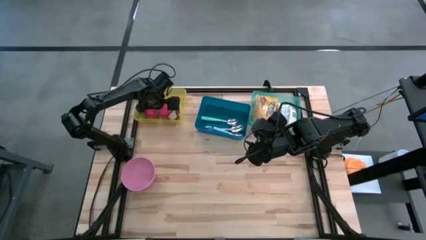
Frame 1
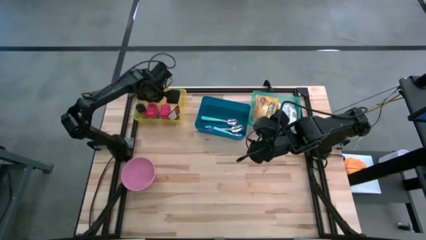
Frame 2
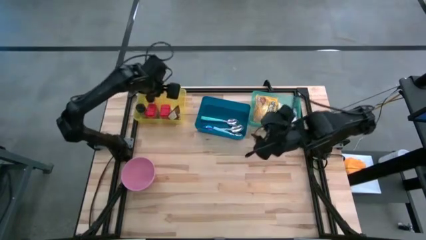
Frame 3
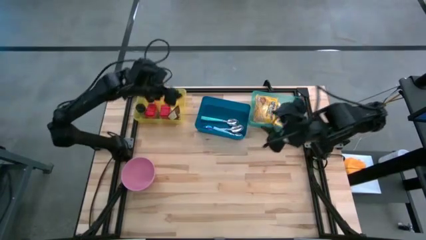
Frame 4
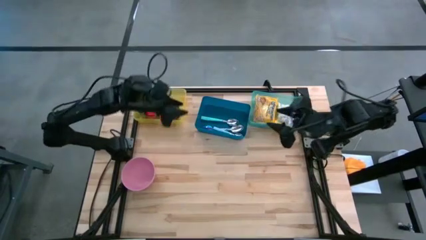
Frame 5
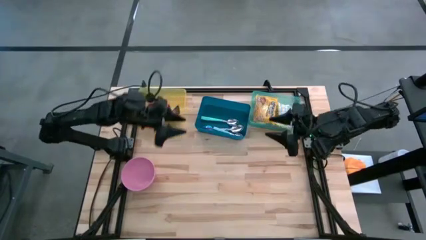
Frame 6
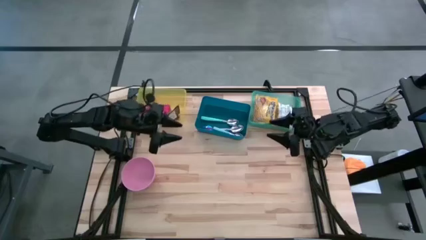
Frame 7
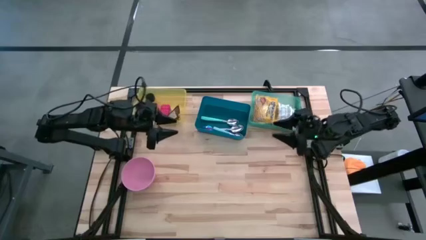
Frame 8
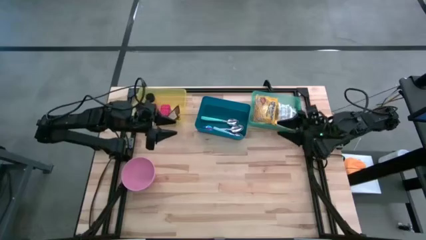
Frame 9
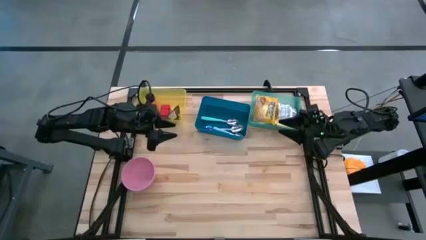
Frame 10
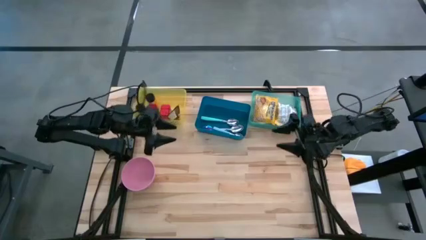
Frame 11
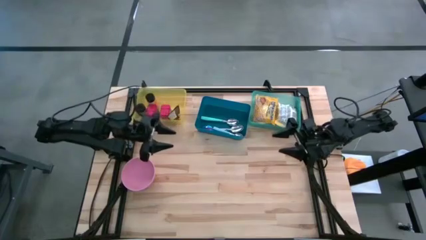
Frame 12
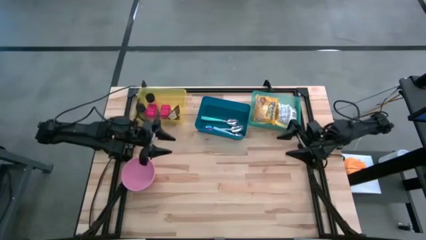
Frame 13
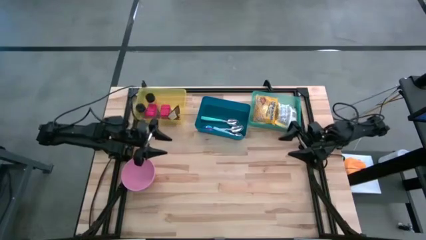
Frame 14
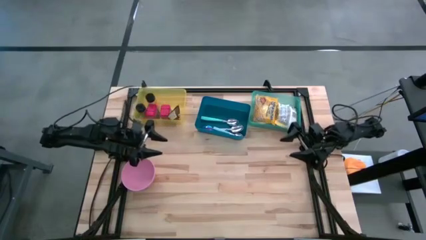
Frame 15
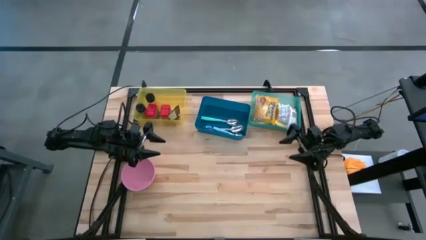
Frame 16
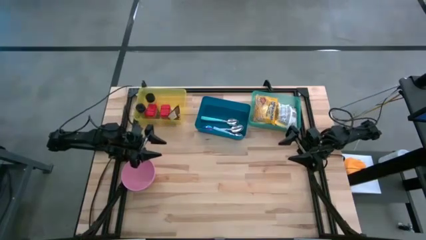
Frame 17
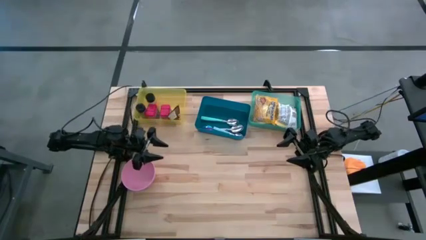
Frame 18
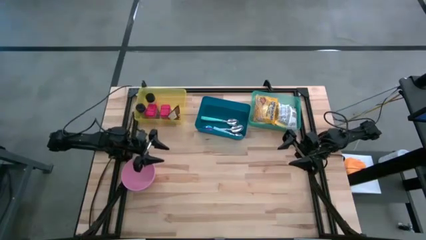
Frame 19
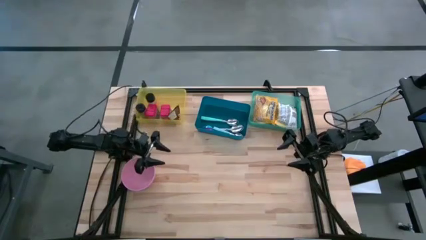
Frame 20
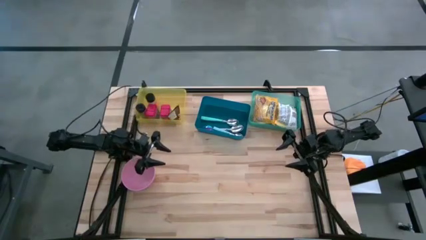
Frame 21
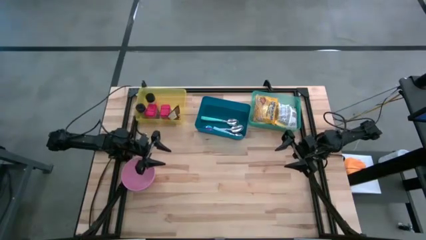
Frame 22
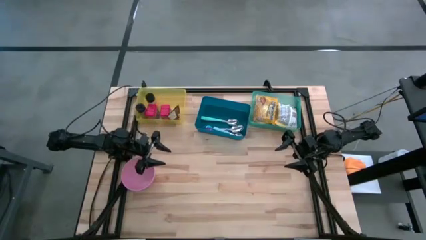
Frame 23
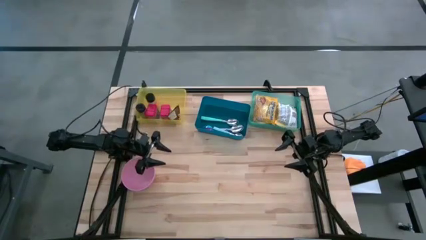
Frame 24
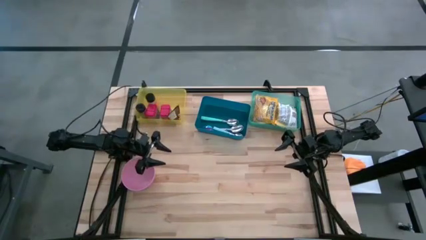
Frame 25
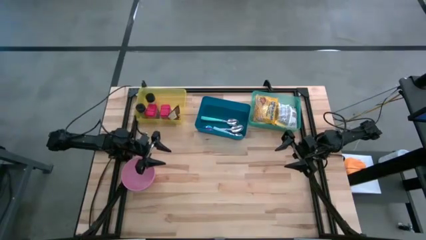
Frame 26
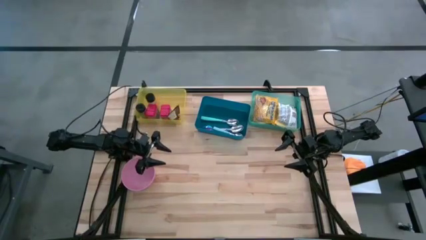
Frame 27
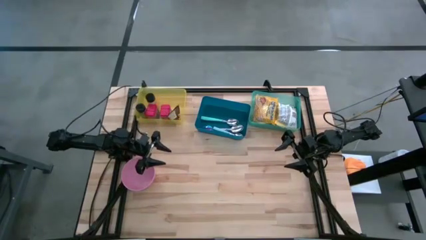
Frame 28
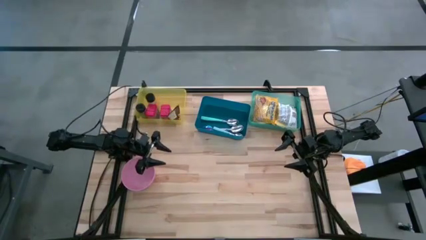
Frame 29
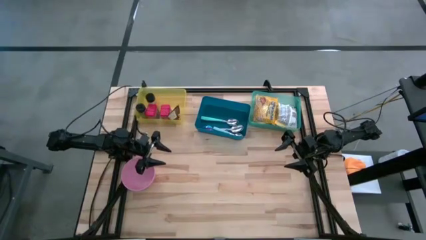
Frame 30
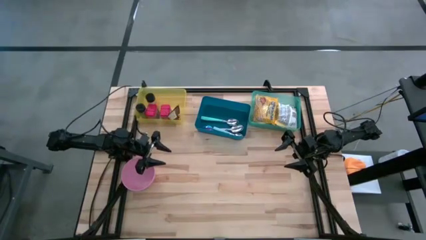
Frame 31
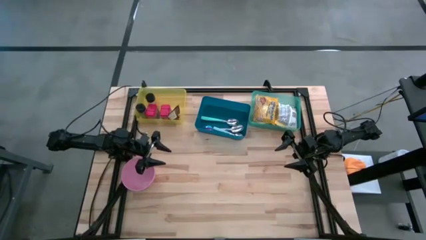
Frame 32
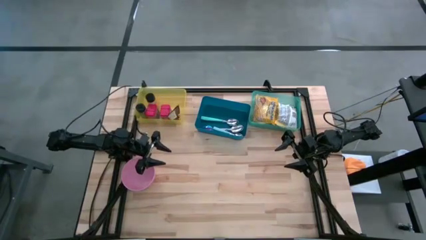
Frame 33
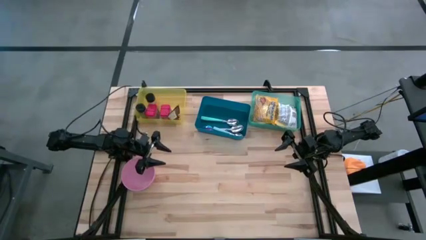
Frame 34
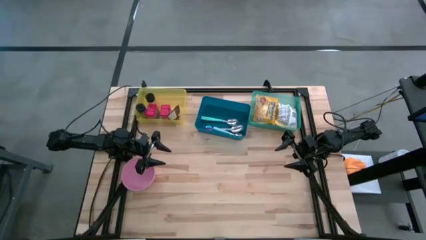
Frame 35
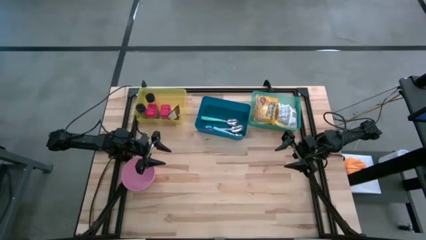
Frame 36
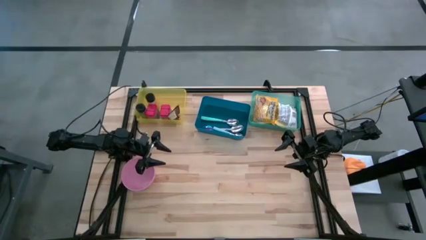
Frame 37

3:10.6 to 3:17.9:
Return to Home Position

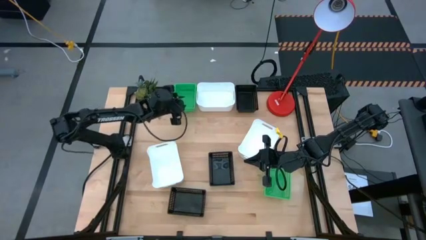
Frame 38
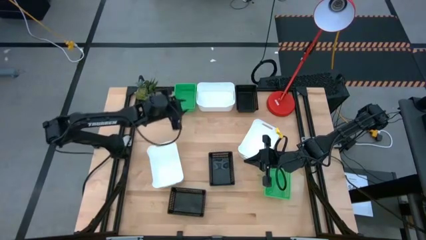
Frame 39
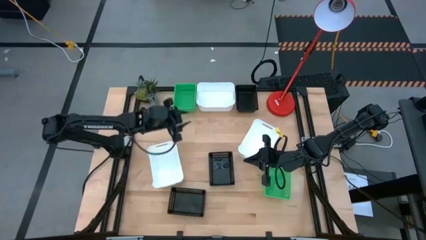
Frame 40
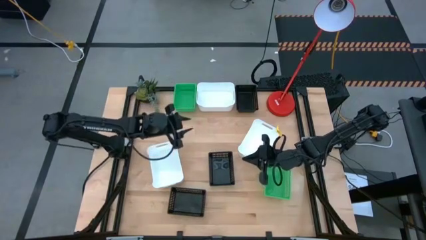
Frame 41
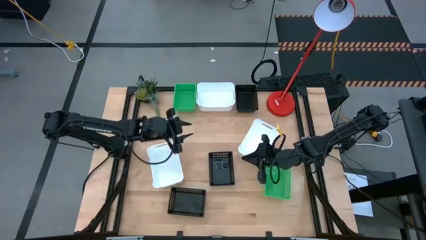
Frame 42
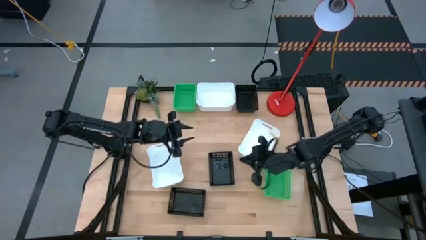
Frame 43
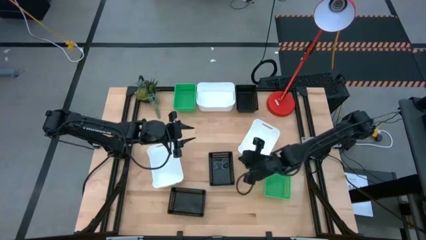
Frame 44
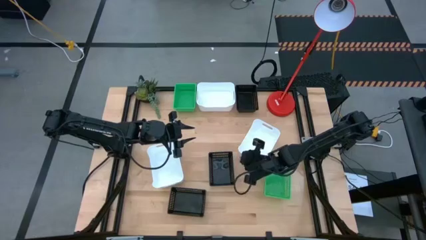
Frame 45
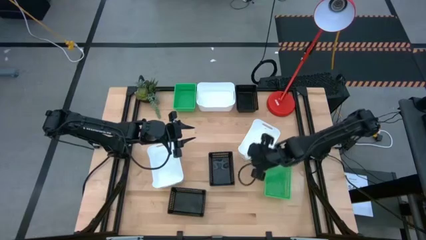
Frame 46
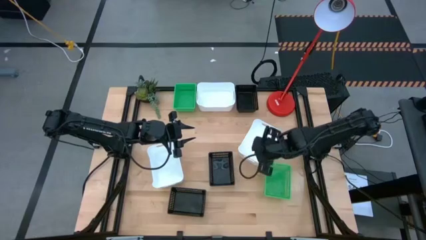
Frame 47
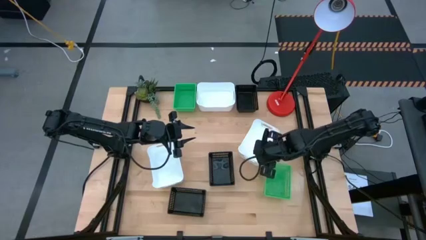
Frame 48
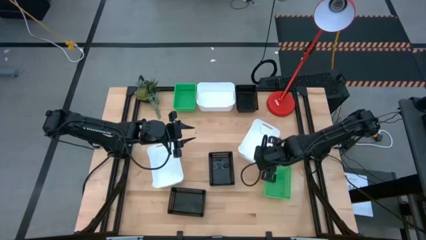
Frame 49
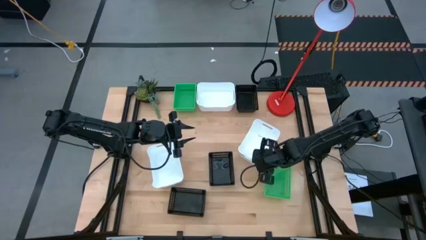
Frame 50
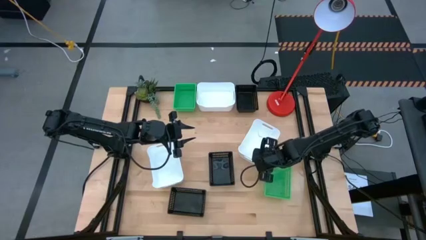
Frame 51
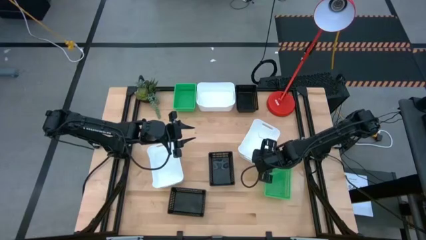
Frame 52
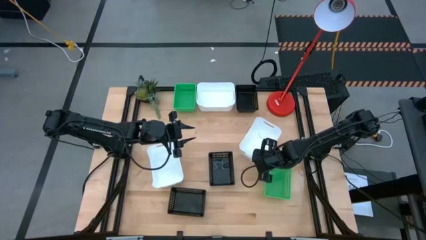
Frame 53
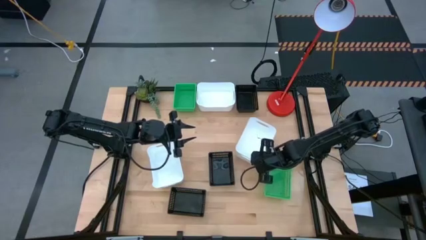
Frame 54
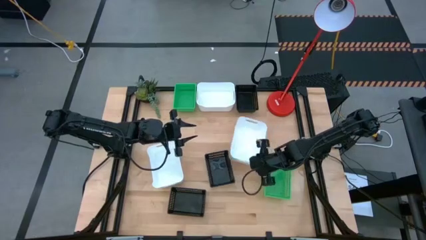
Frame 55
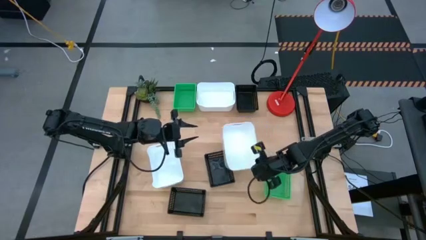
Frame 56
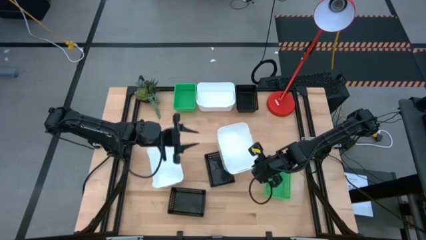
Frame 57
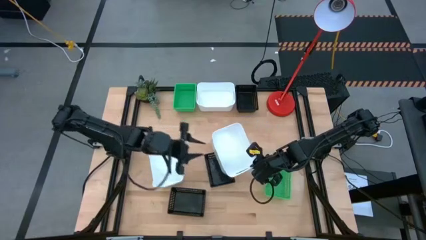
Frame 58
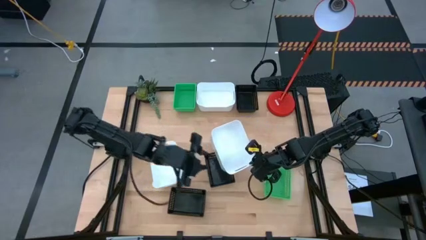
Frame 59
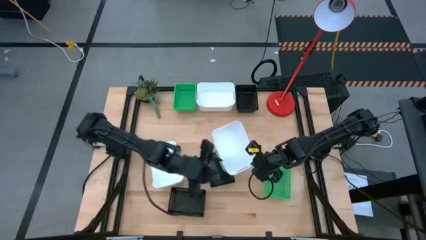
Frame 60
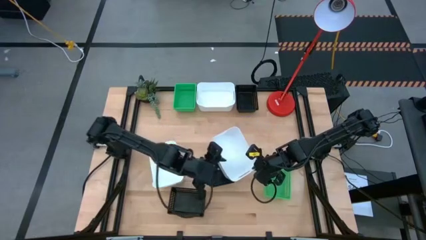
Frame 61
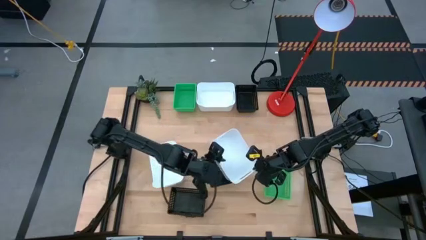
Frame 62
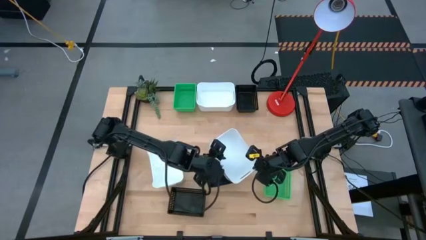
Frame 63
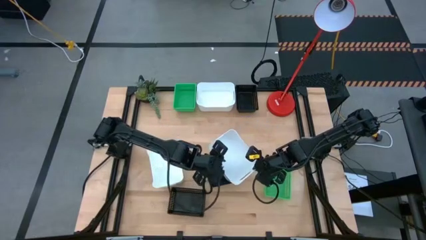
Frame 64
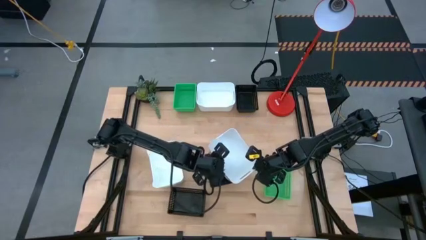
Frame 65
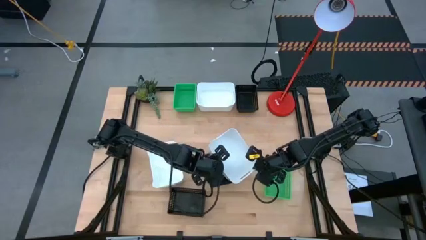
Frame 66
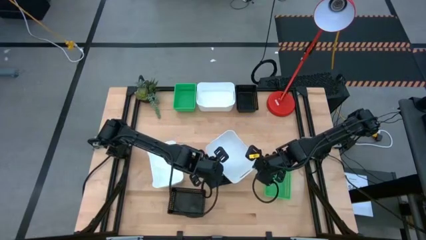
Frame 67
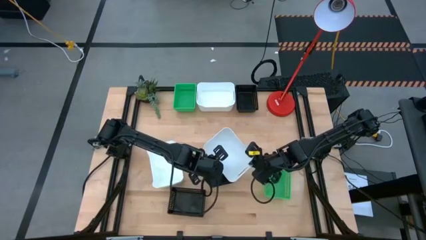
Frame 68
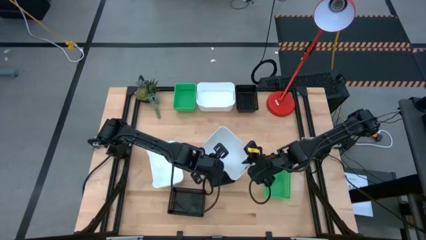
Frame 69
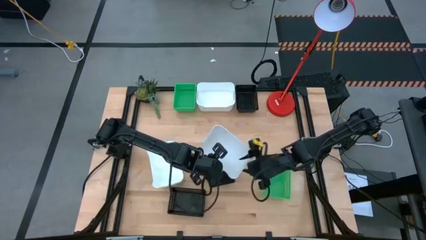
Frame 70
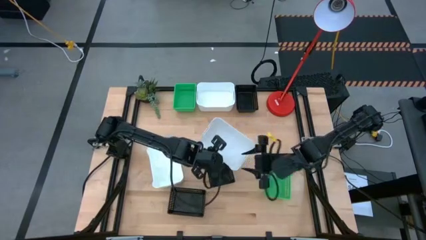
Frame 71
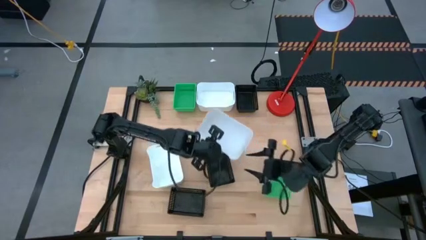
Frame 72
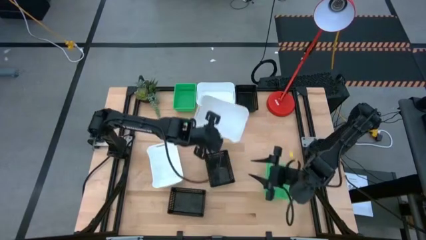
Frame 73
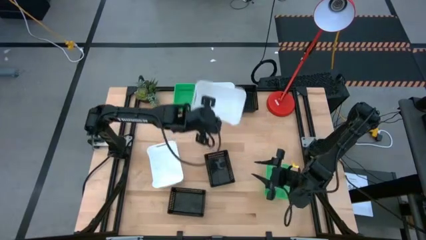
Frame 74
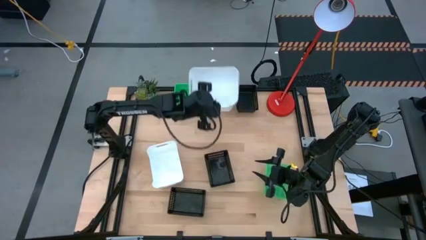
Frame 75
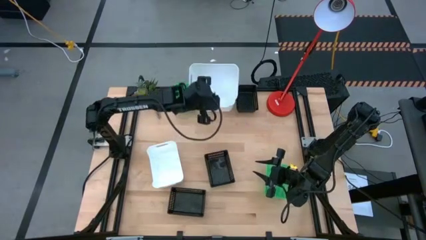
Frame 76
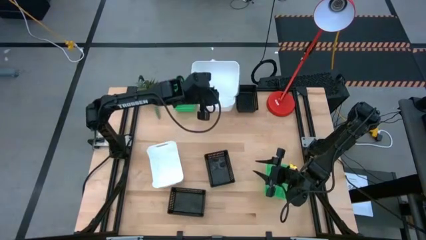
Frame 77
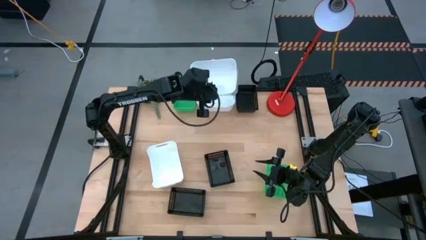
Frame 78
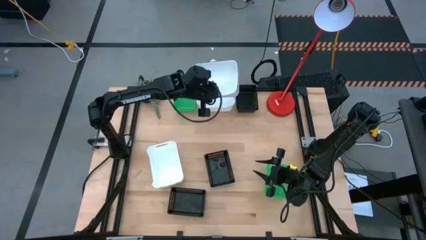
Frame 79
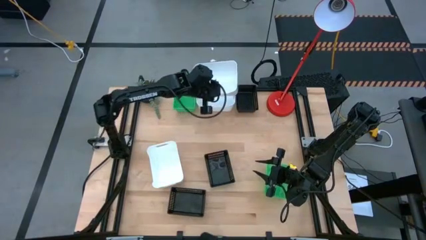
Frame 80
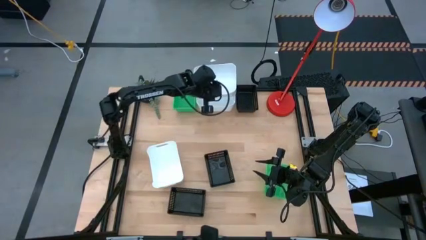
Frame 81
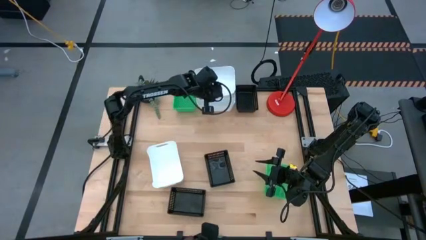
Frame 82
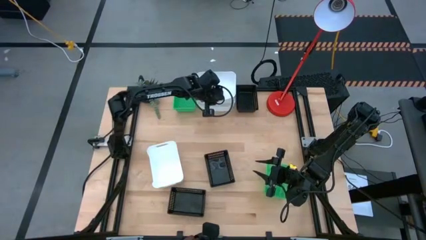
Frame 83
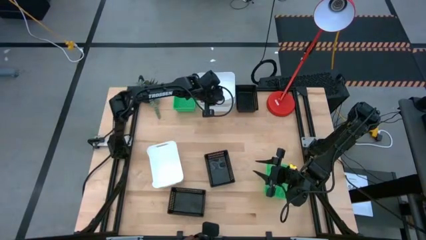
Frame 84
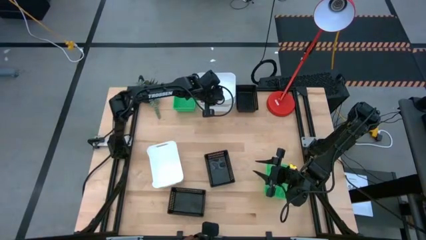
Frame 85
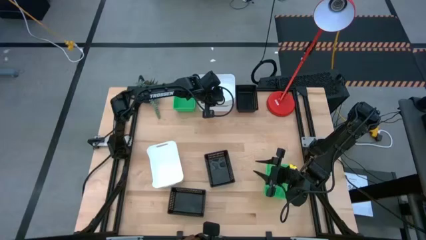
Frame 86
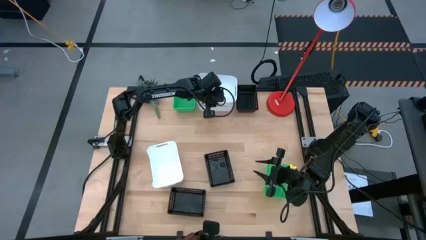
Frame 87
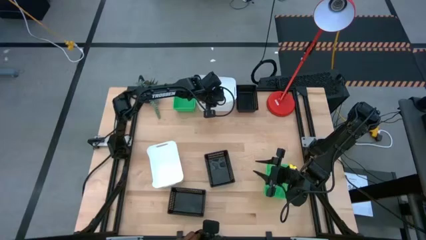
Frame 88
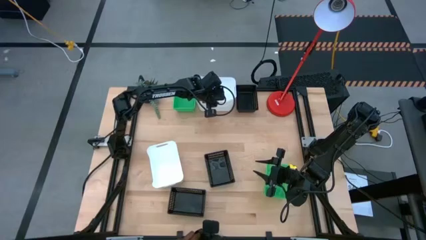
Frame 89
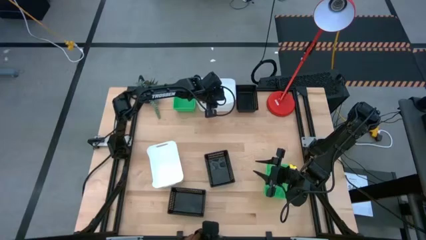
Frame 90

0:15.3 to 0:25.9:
Stack the bottom right white bin on the top white bin
